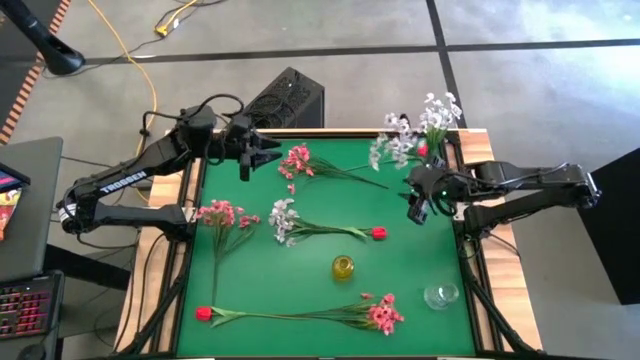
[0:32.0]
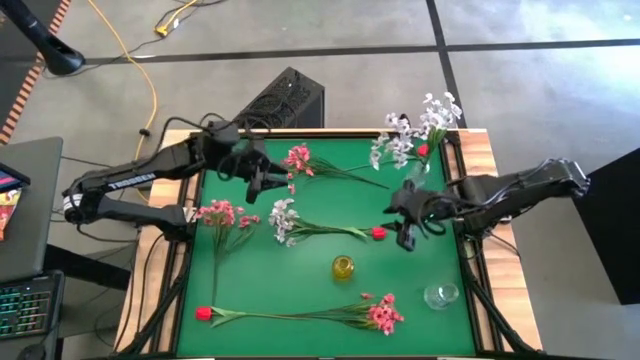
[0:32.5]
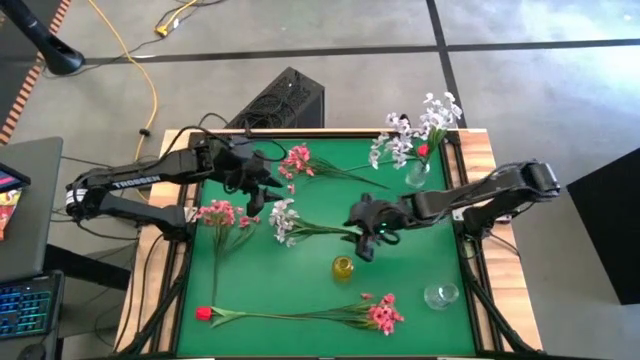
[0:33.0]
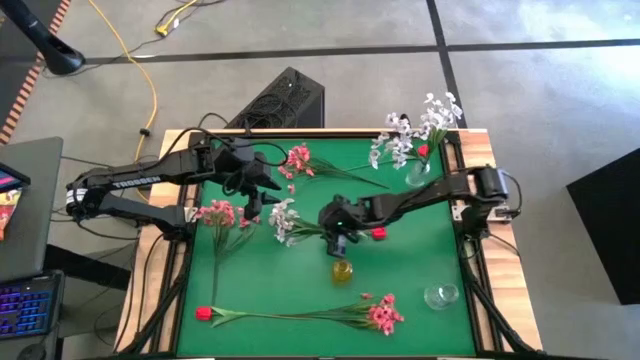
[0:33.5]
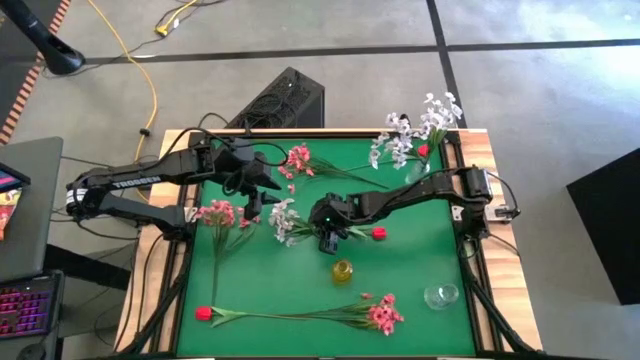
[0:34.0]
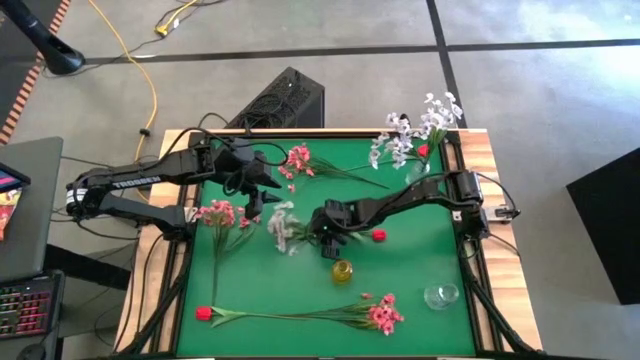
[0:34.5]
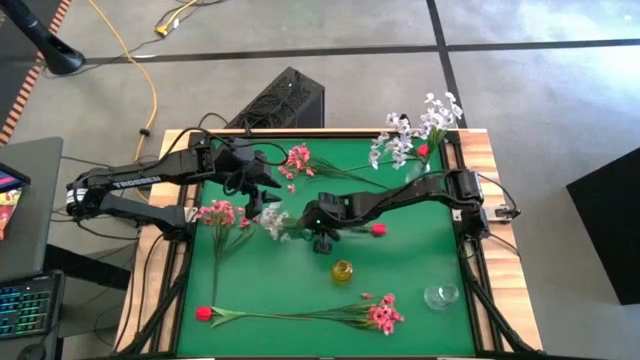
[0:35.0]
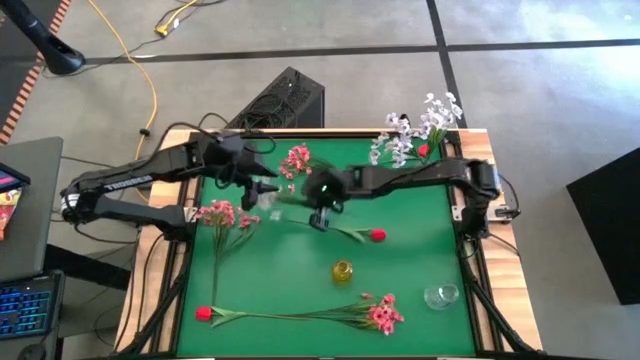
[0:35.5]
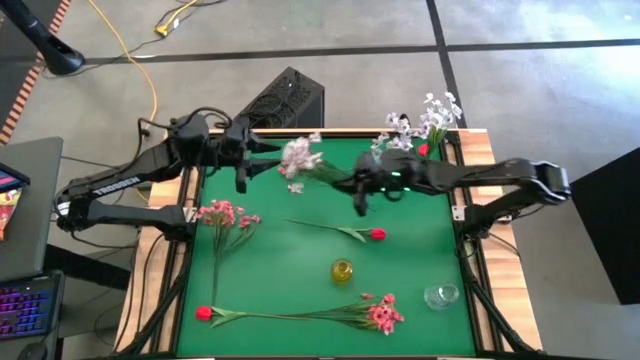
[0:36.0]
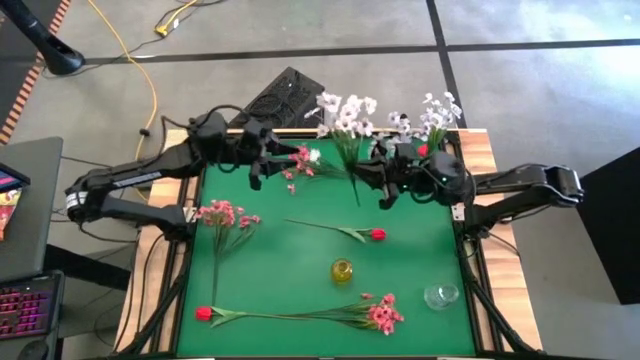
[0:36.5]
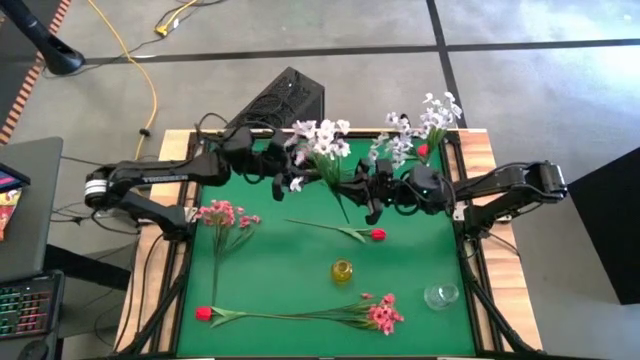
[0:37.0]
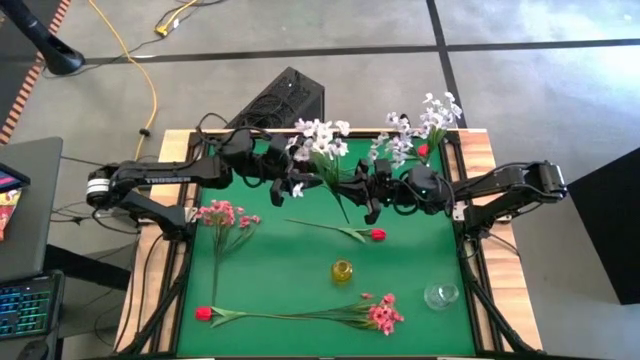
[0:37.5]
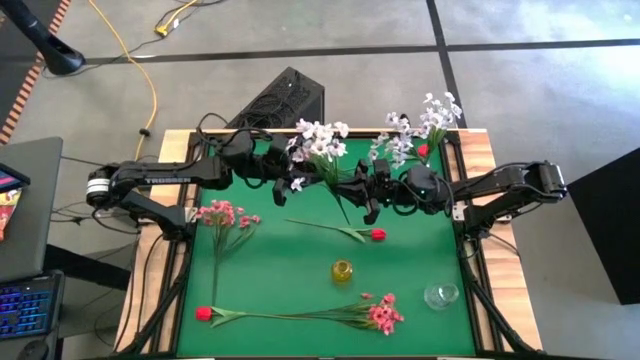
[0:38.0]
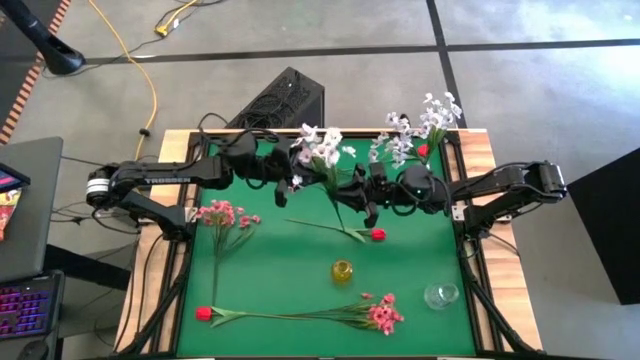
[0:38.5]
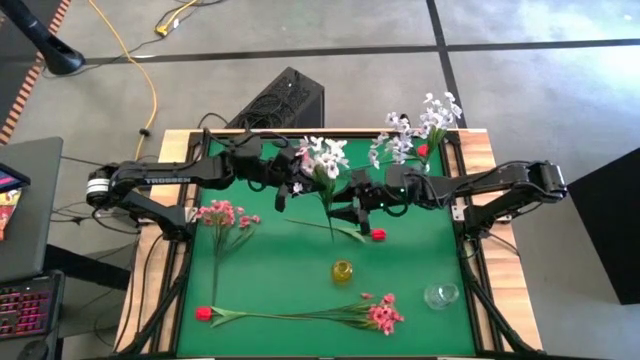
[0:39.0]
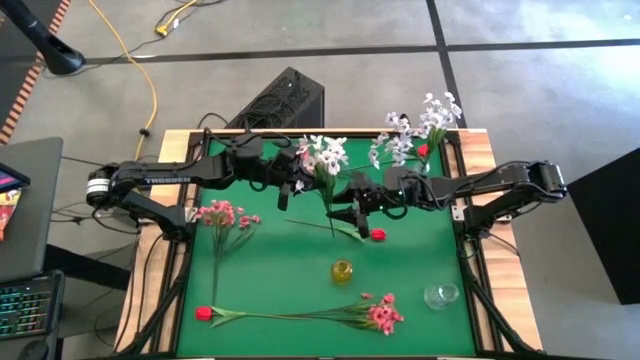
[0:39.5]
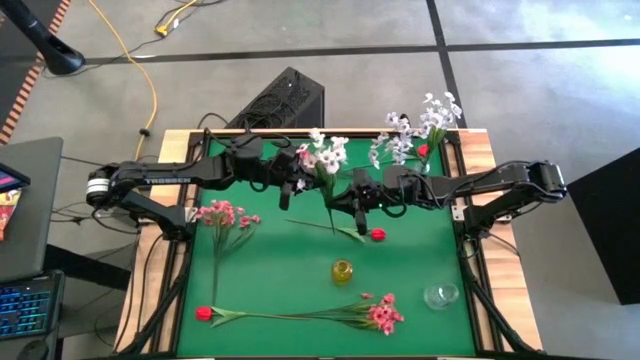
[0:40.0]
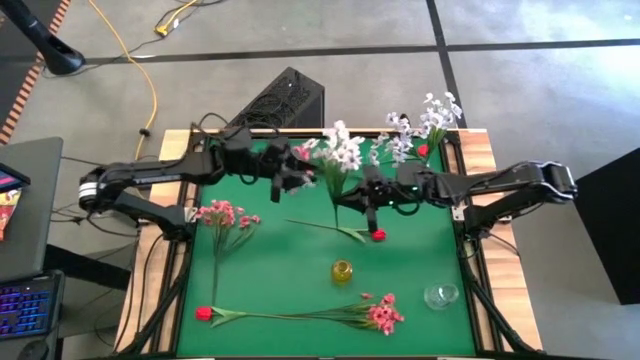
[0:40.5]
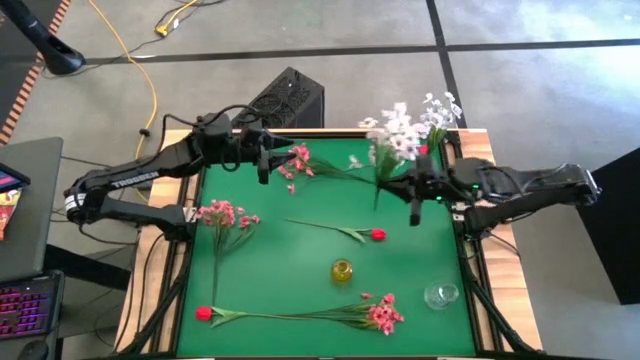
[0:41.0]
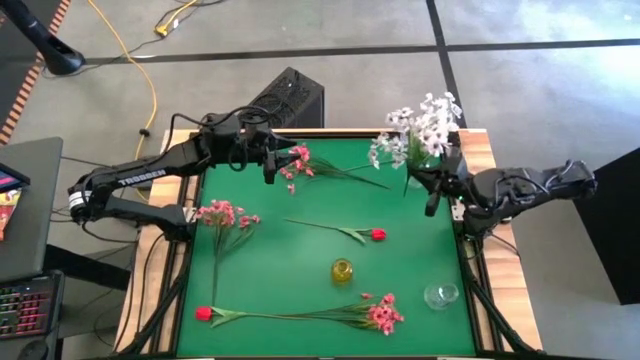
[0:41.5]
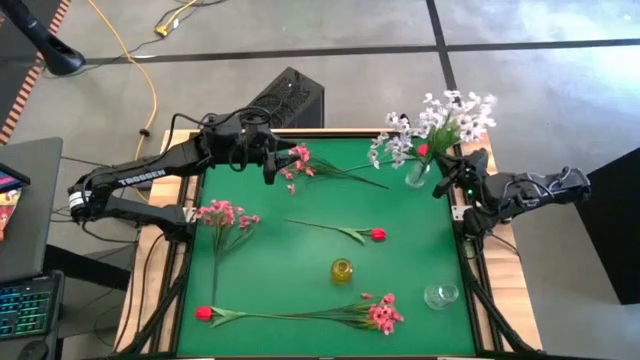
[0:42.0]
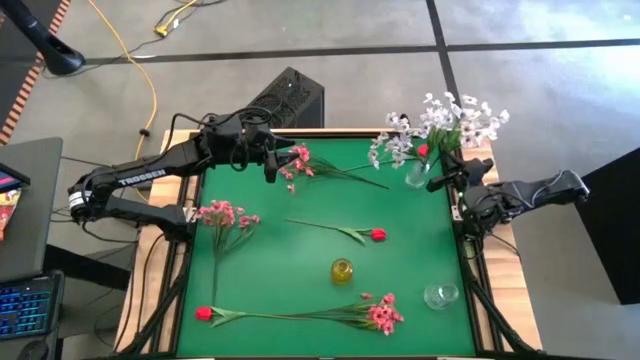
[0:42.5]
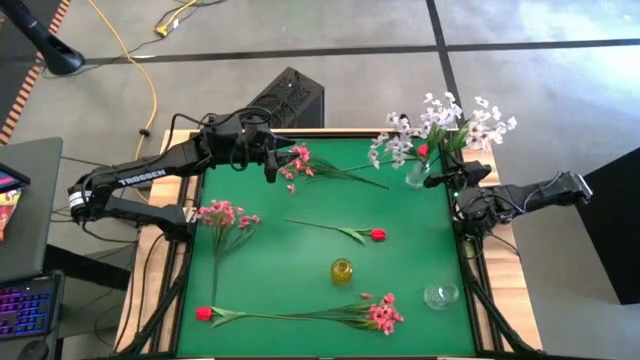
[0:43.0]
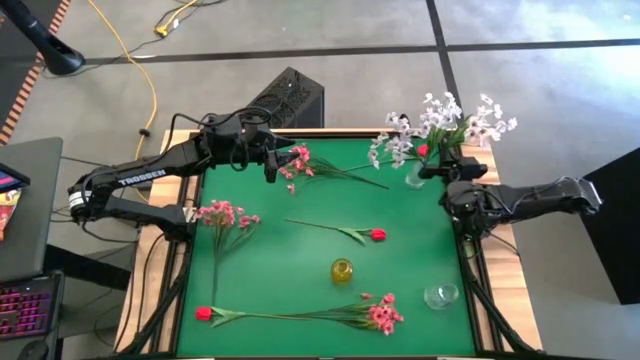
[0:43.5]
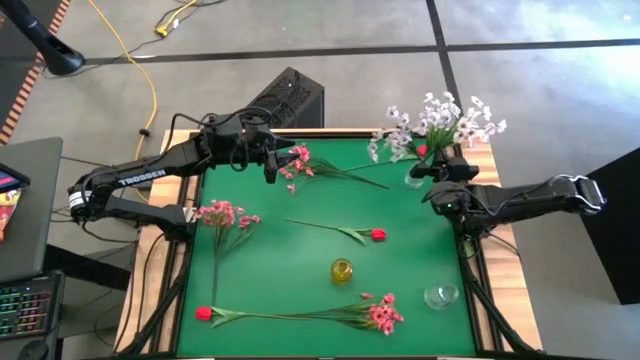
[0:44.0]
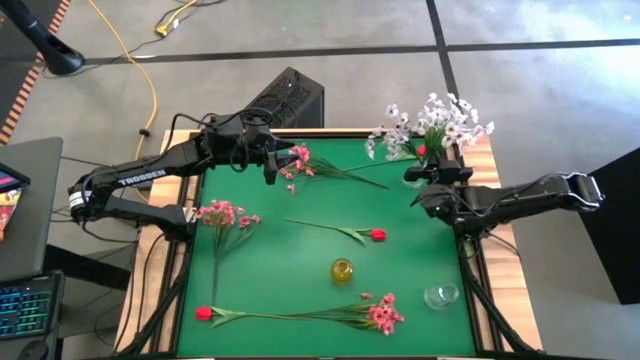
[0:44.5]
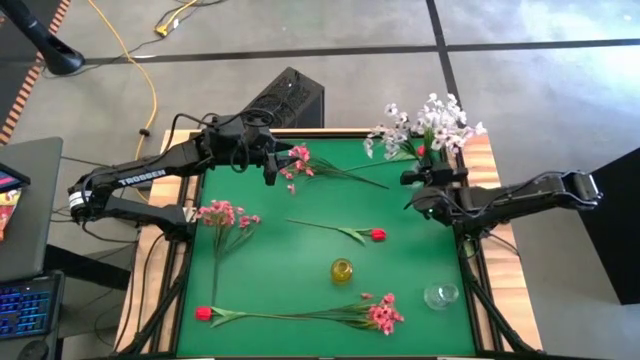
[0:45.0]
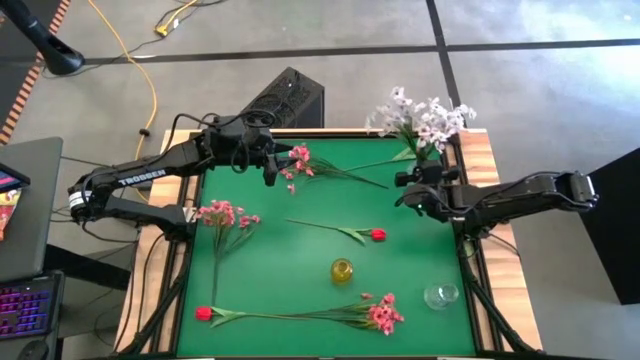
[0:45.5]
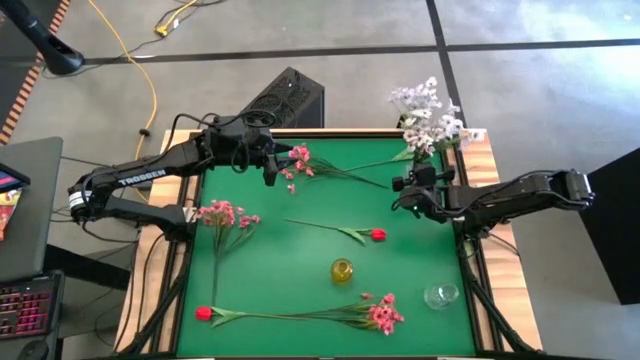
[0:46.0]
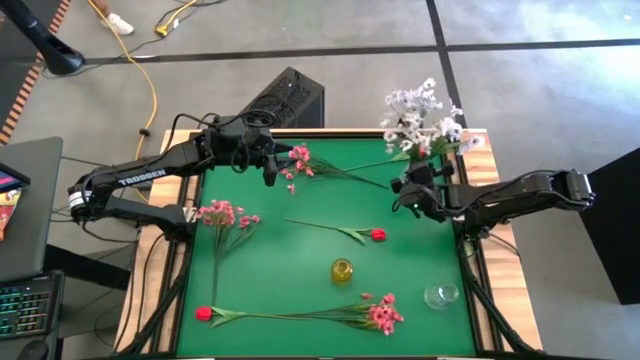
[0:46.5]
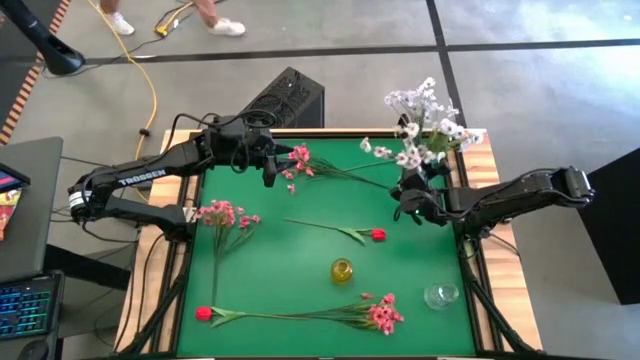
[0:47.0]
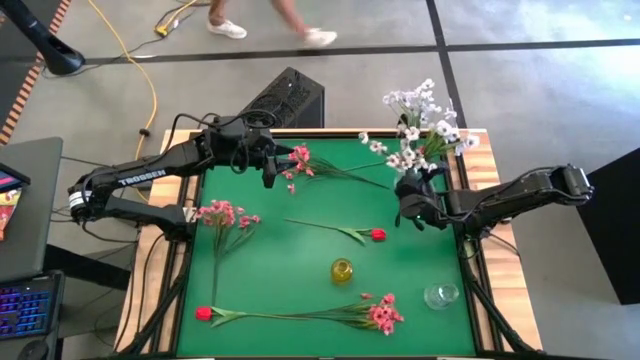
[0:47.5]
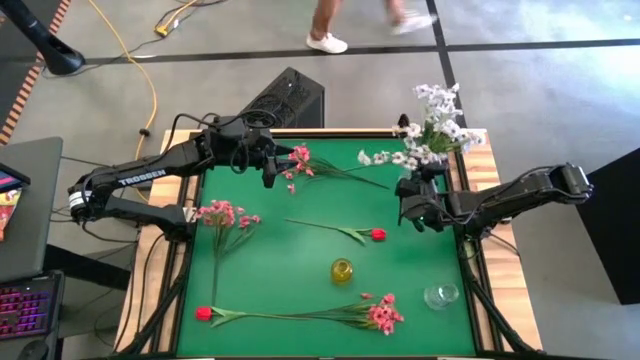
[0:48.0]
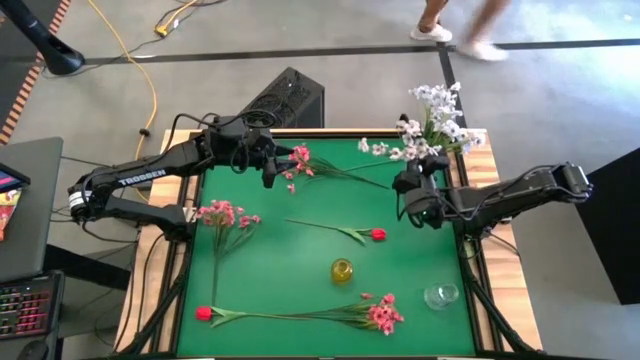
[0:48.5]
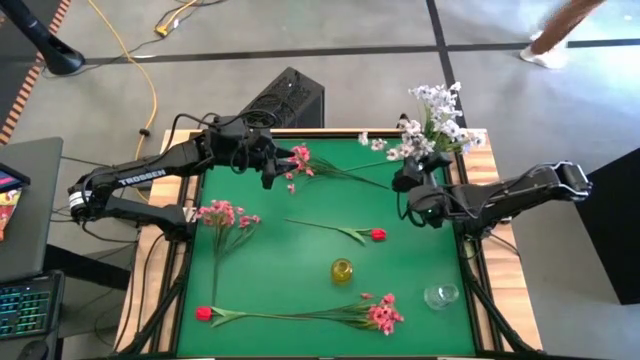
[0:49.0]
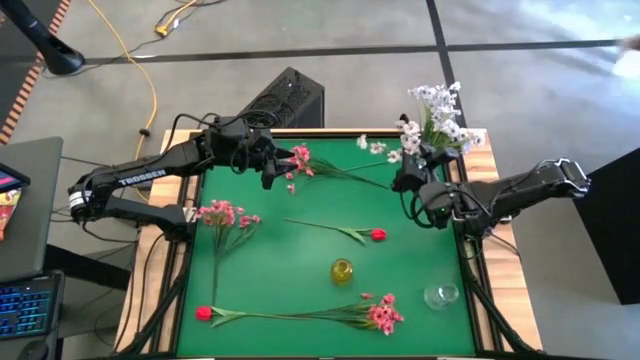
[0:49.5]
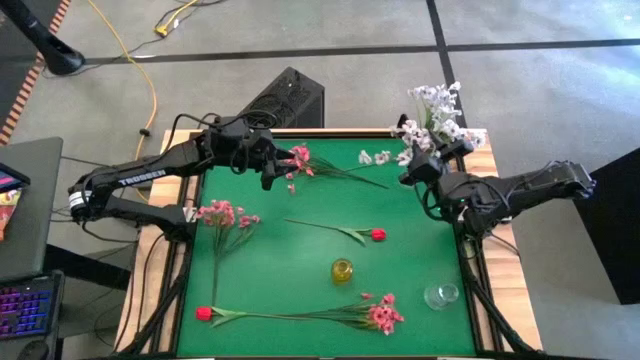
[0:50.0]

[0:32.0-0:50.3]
Task: Sort flowers into vase by color
Put the middle white flowers into the top transparent vase

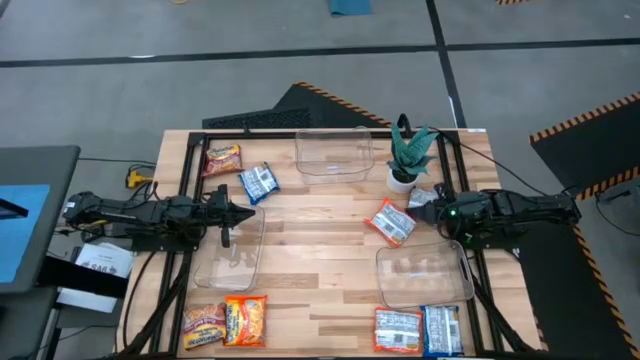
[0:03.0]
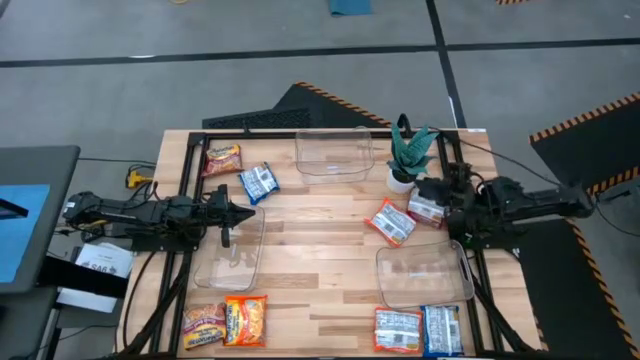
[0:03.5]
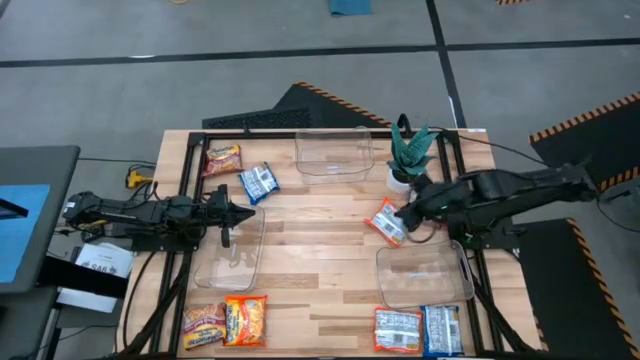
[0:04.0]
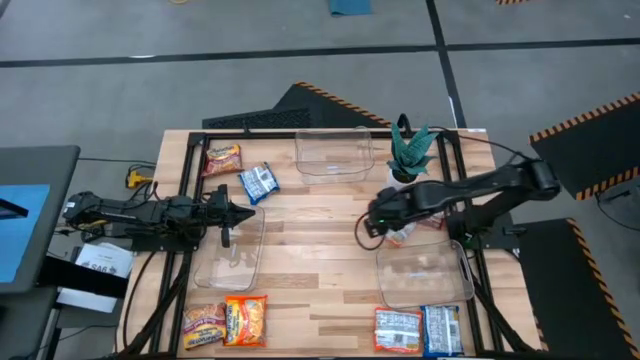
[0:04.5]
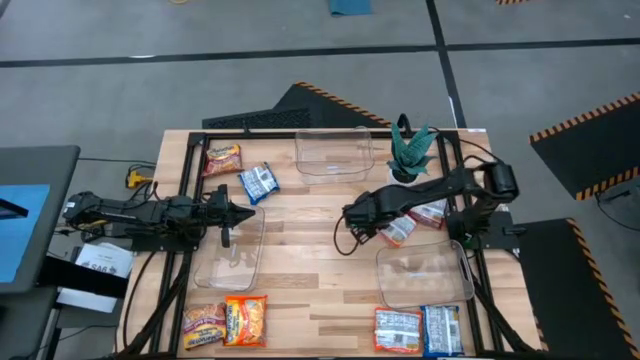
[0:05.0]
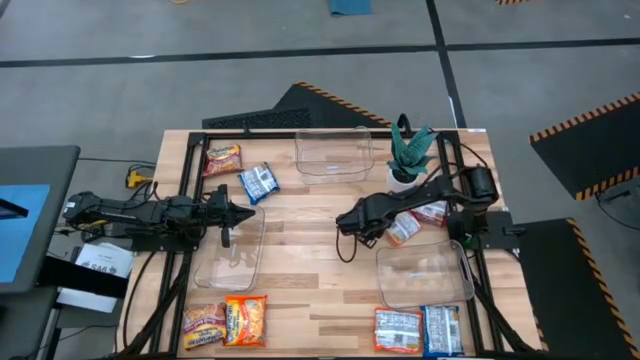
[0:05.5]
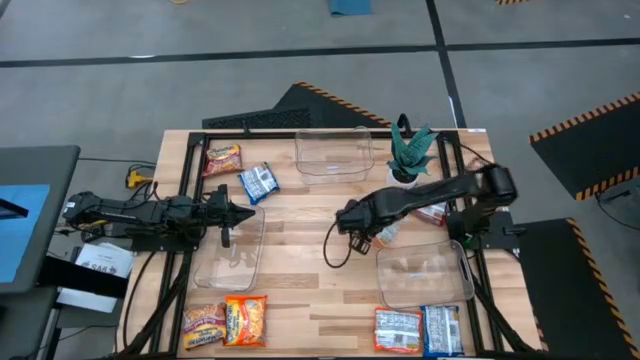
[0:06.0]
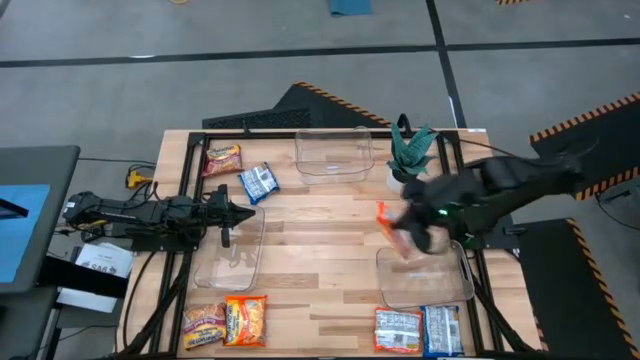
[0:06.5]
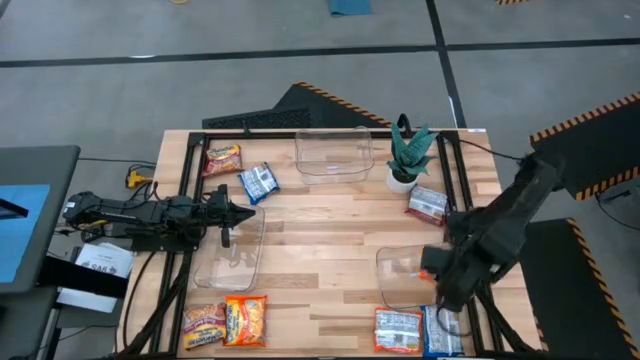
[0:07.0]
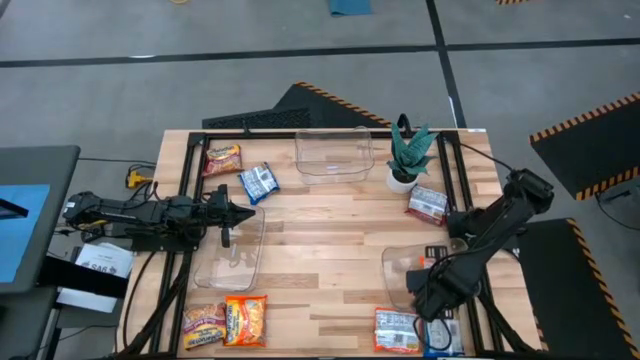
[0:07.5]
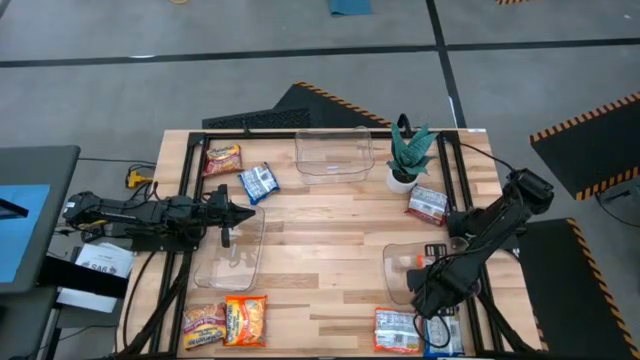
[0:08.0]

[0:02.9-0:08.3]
Task: Sort Maruchan noodles
Put the top orange noodle pack into the bottom right transparent bin
